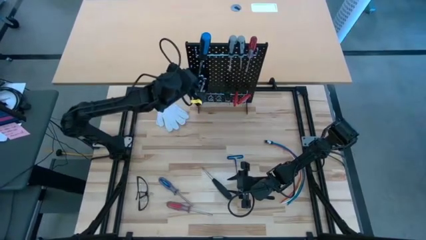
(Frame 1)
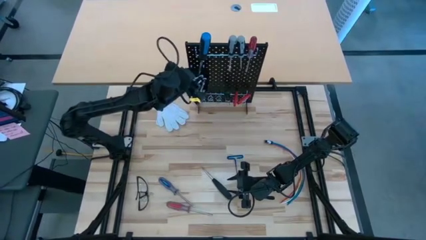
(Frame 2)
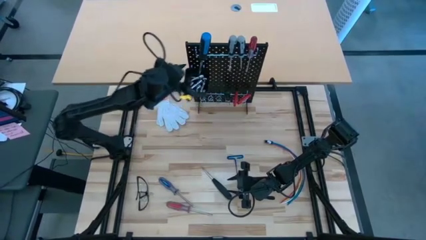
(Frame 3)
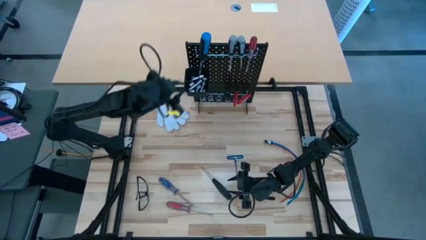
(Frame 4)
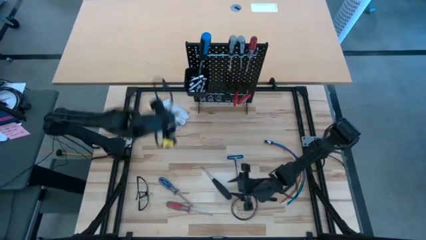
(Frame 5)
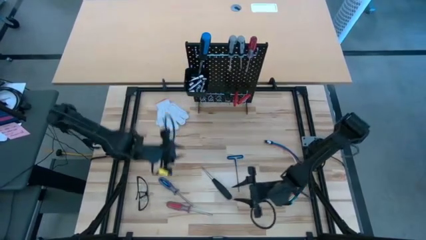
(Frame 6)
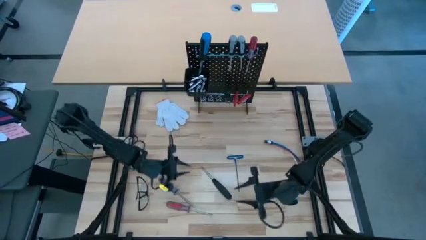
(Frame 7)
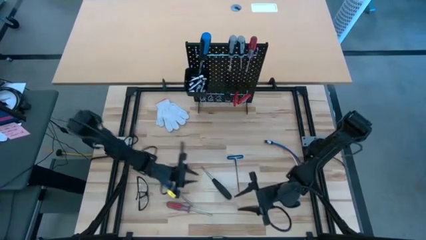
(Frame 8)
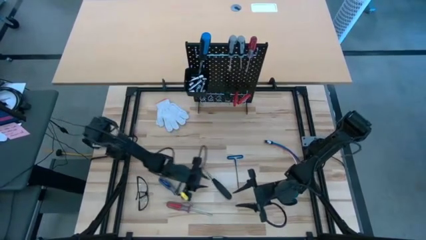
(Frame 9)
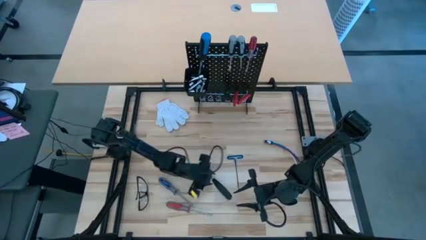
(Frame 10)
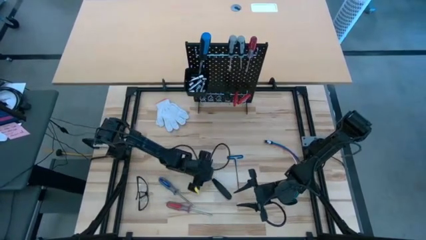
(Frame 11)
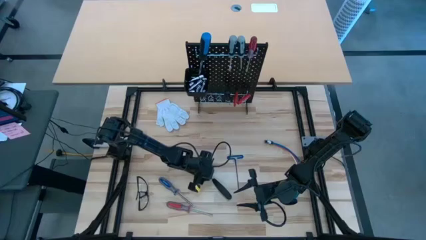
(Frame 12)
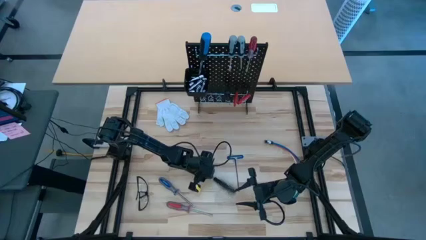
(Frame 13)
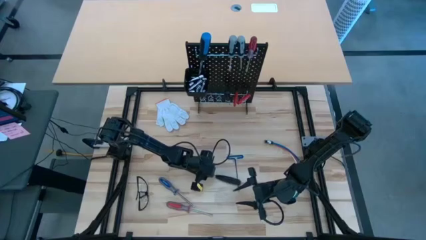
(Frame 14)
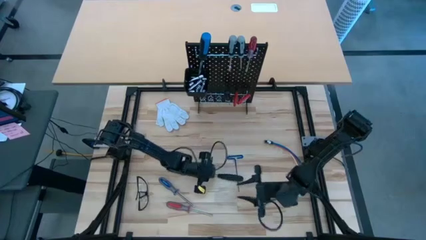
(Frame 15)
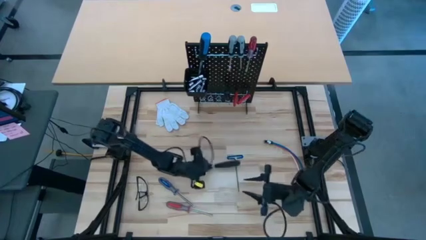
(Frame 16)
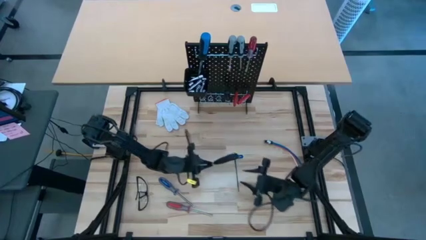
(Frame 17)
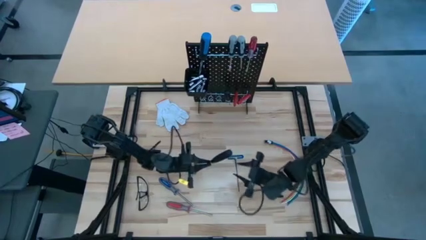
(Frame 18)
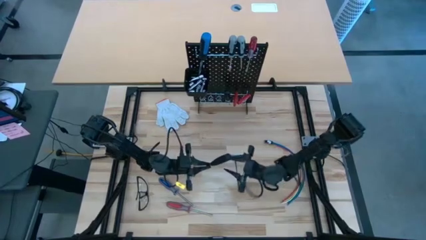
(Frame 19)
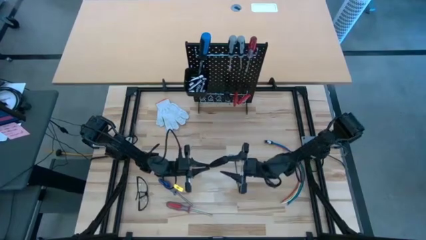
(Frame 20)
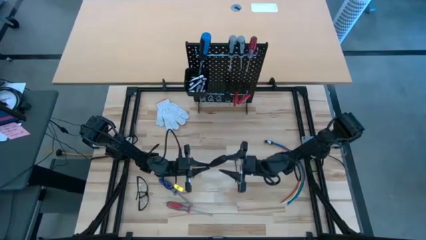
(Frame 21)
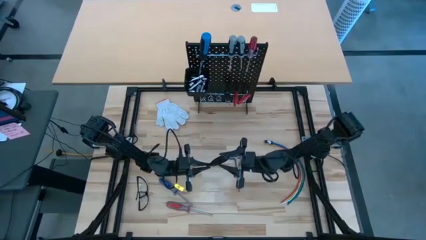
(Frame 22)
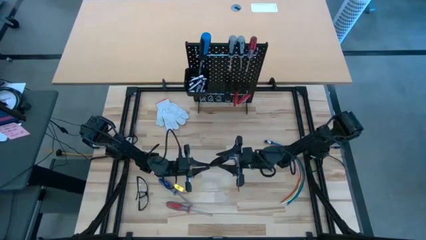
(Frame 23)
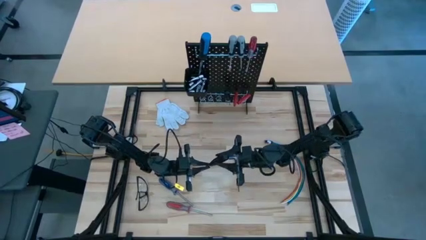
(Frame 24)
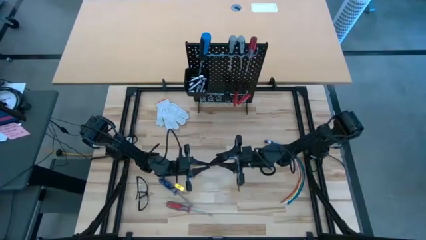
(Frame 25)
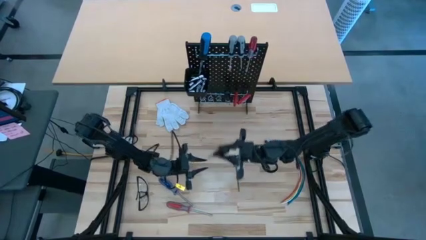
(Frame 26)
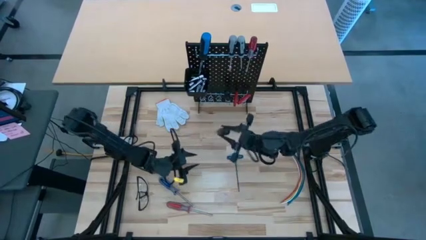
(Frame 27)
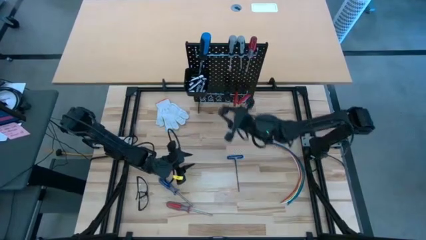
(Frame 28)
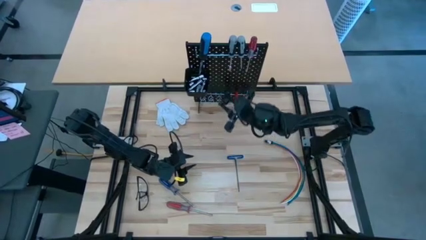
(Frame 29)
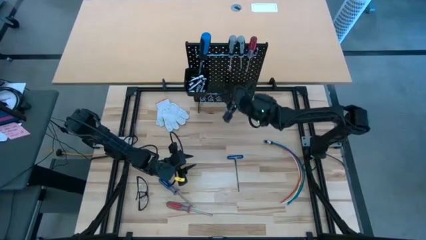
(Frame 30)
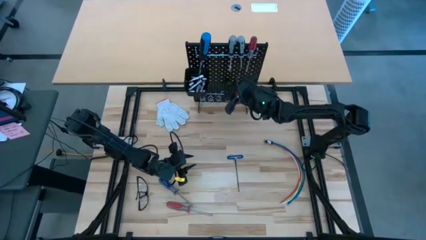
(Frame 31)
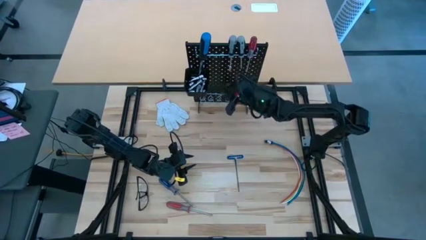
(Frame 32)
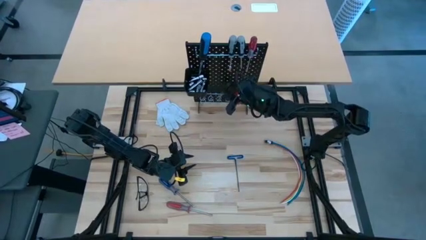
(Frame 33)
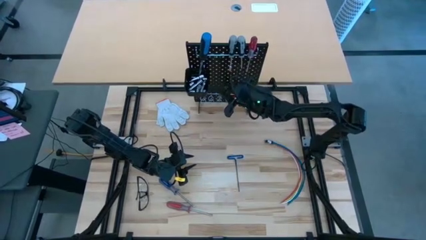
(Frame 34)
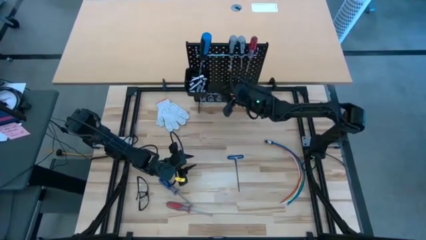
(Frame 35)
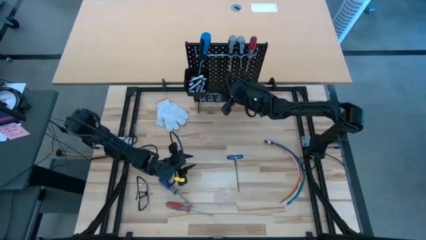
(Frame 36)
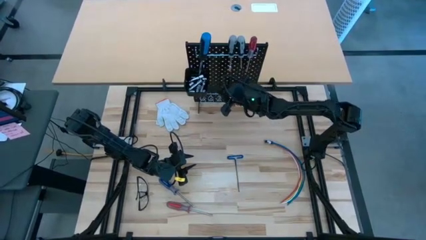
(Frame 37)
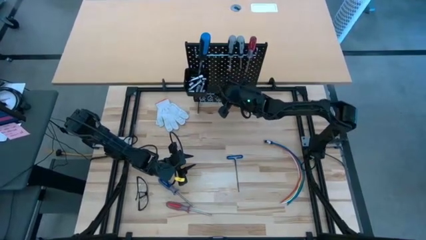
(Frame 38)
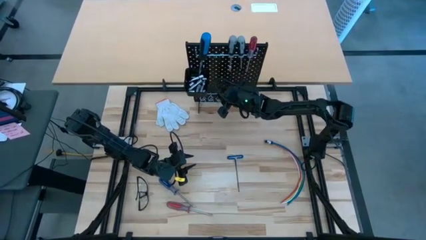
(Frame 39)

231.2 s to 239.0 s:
Task: Hang tools onto peg board
Hang the black screwdriver on the pegboard

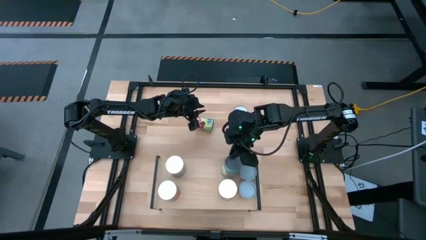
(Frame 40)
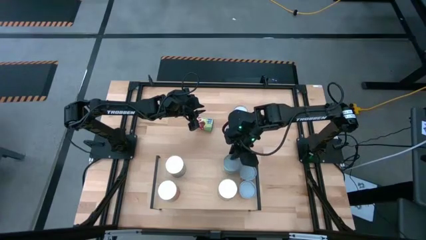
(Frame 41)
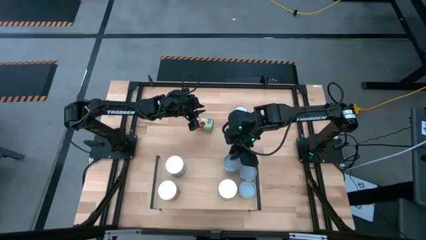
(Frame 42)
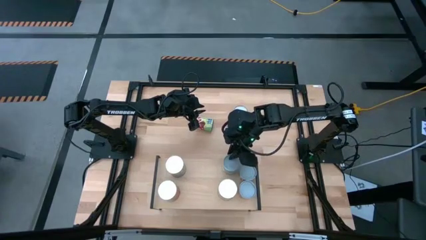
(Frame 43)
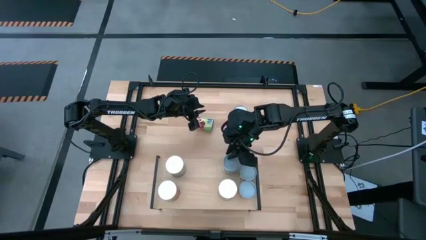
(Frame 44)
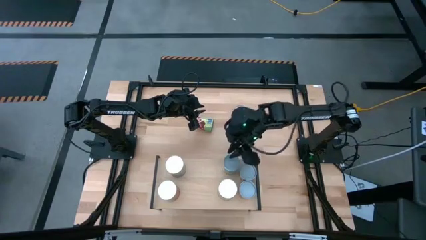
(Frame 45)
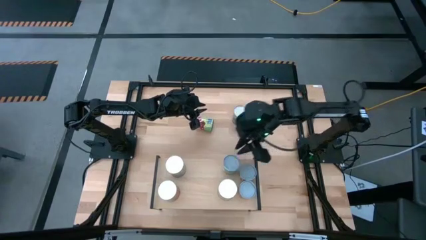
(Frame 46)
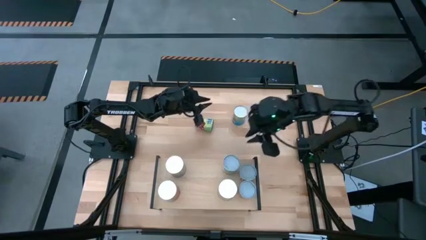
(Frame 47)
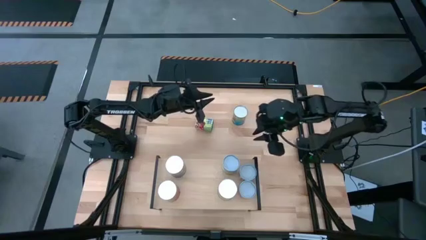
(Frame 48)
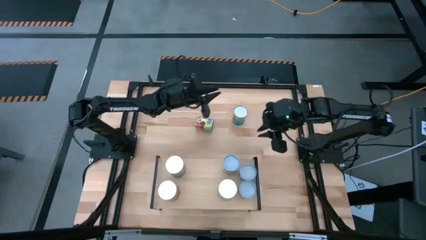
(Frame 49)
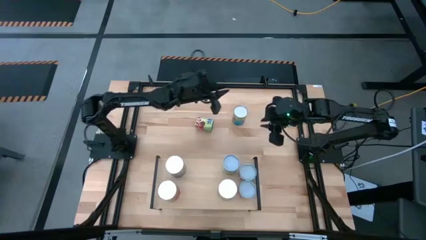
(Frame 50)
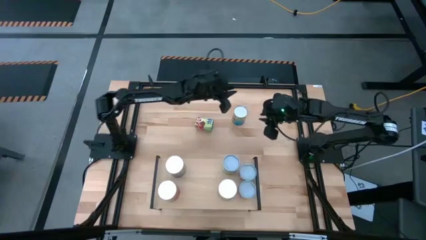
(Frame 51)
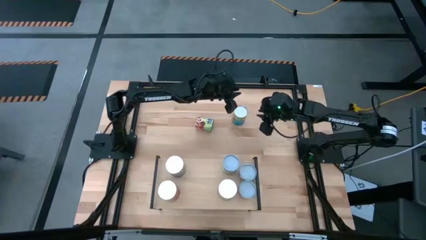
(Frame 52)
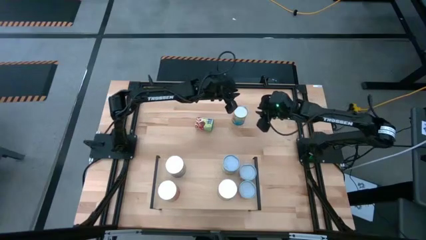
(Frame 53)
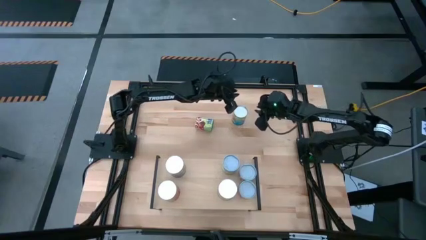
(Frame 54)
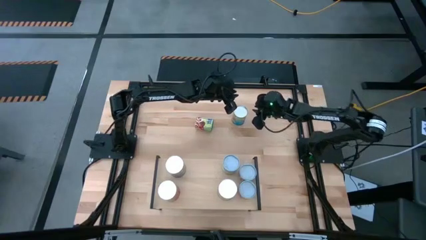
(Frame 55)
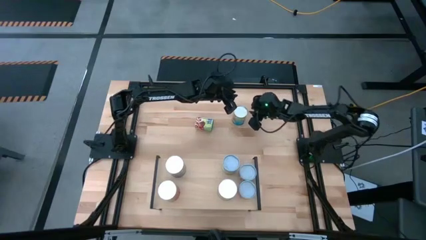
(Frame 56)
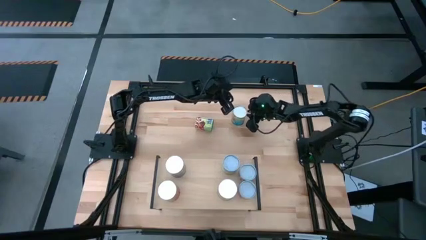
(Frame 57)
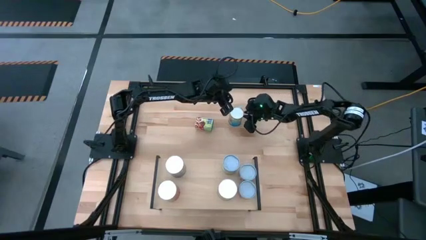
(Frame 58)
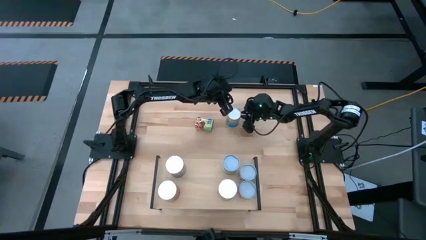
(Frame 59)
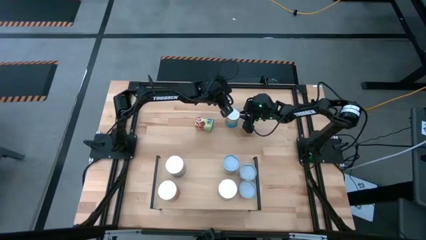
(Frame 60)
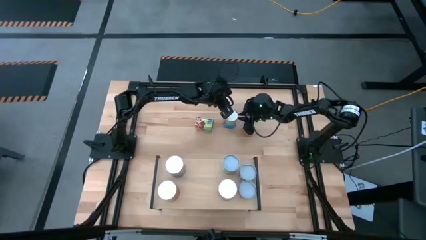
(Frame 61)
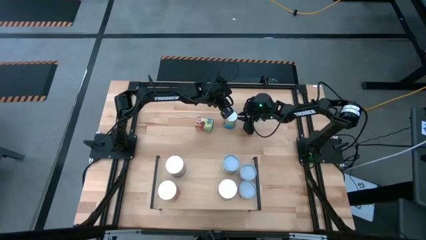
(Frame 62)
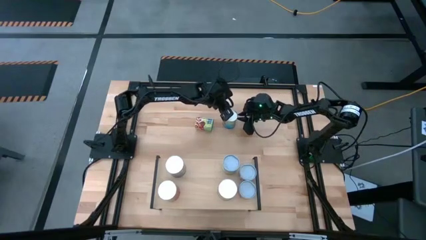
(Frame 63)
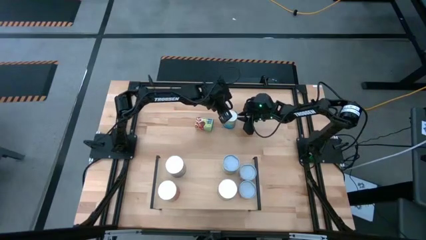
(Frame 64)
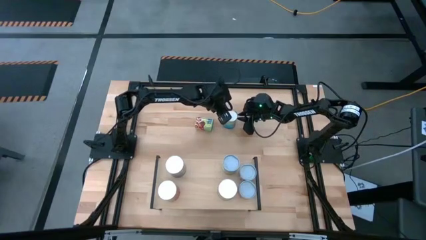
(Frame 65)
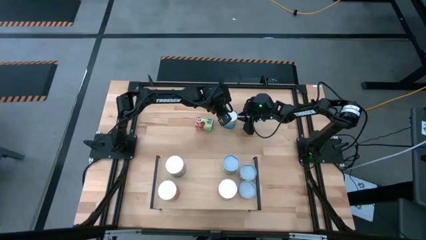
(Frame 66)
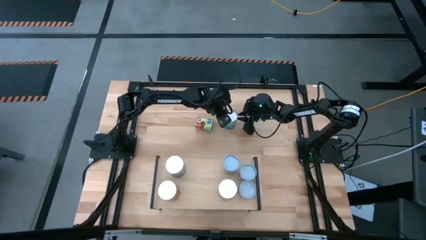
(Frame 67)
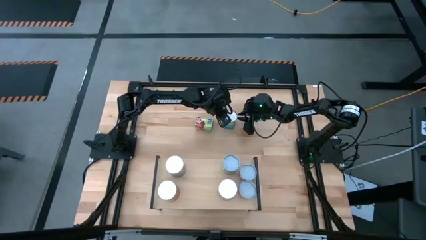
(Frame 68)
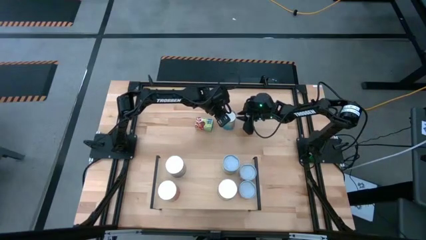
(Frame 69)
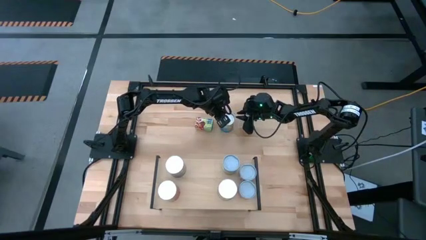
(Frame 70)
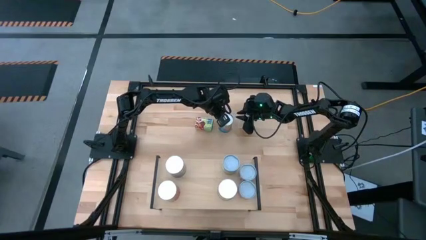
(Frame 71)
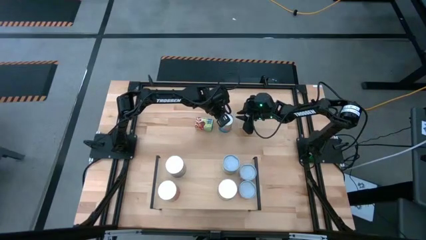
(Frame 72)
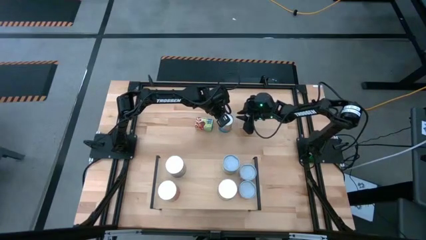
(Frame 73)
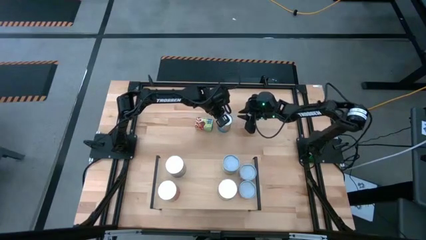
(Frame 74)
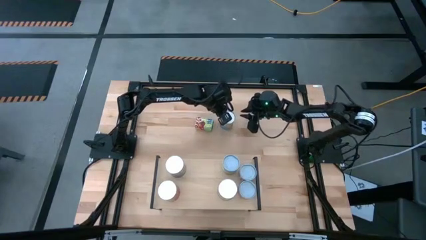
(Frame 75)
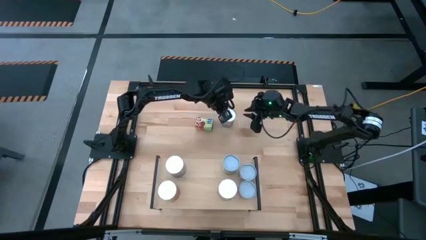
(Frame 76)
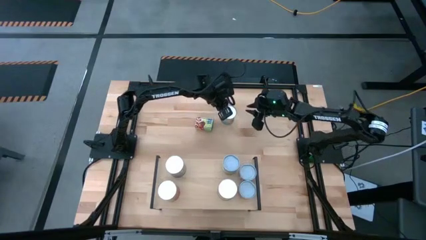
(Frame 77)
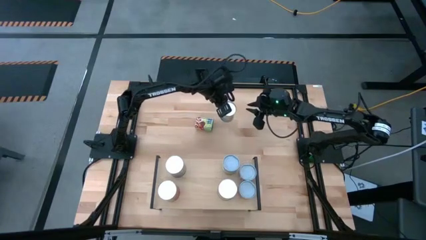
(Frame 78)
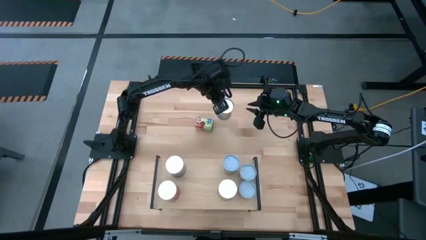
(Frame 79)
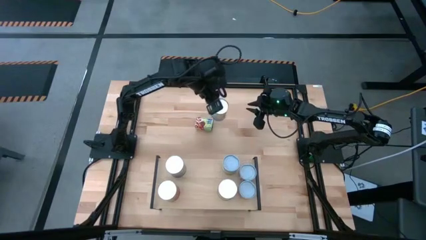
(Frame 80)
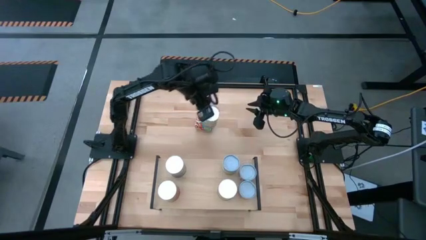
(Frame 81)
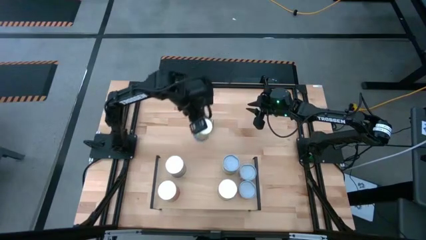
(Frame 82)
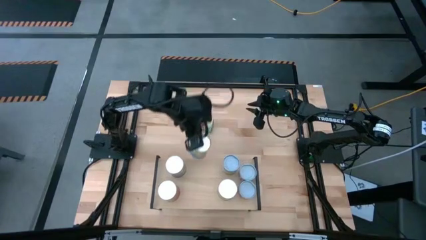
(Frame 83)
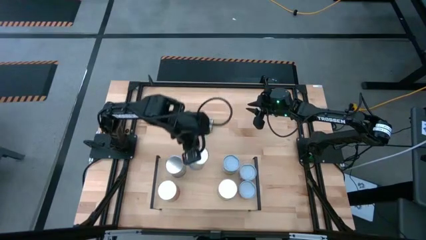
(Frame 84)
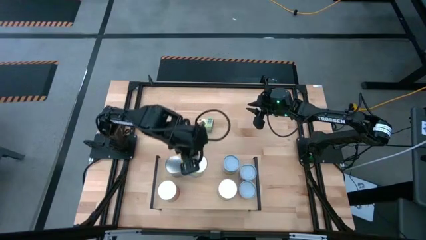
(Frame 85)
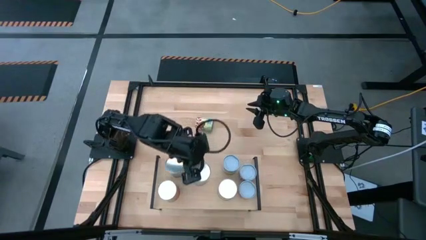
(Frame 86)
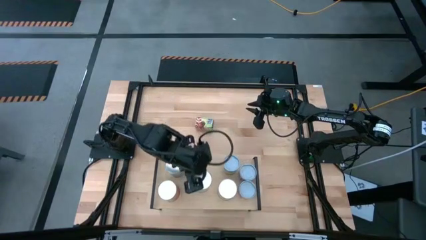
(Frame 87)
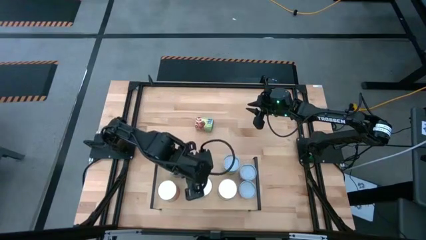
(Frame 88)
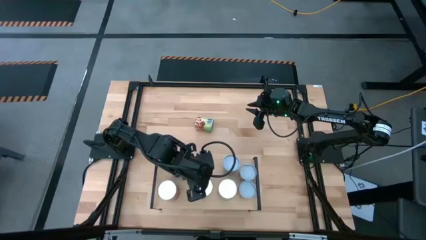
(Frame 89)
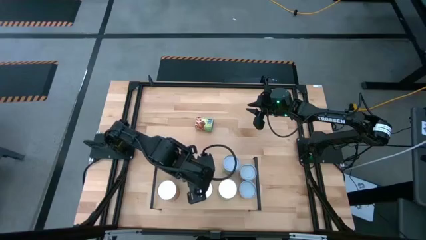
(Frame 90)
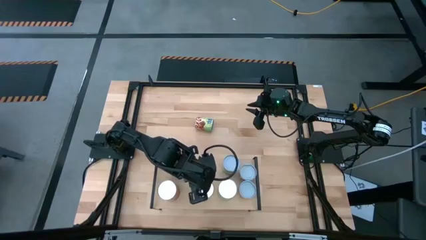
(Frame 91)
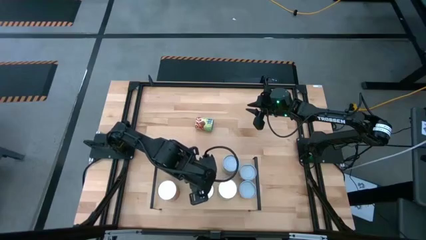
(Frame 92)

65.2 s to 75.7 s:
Task: Pick and place cans onto a shelf
Put the canned tomatoes on the shelf
